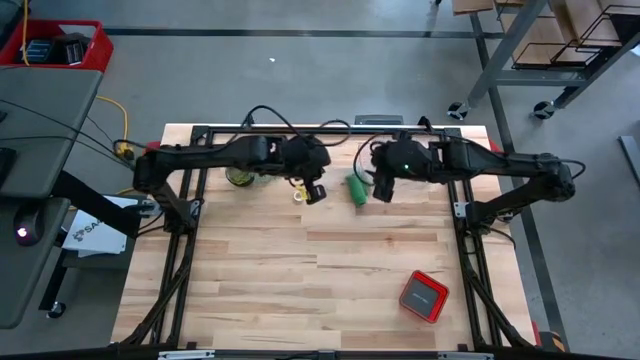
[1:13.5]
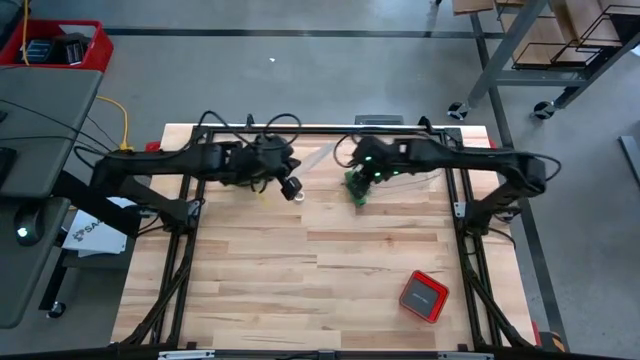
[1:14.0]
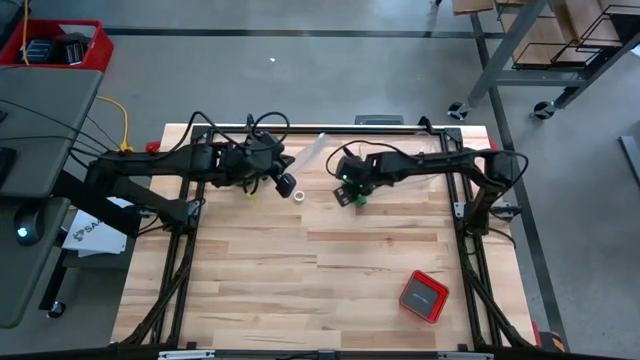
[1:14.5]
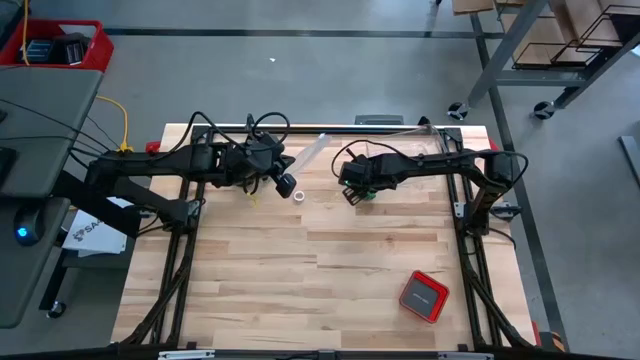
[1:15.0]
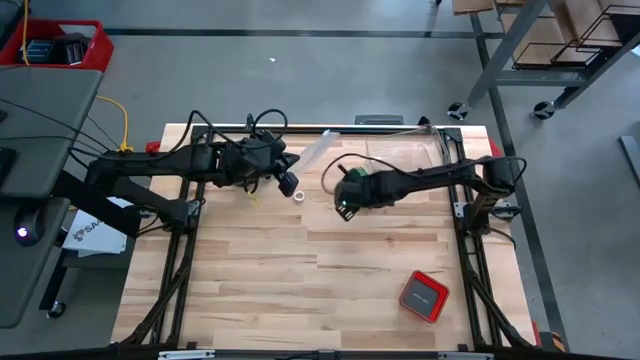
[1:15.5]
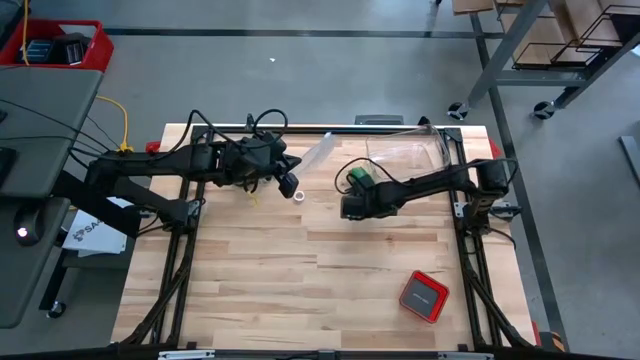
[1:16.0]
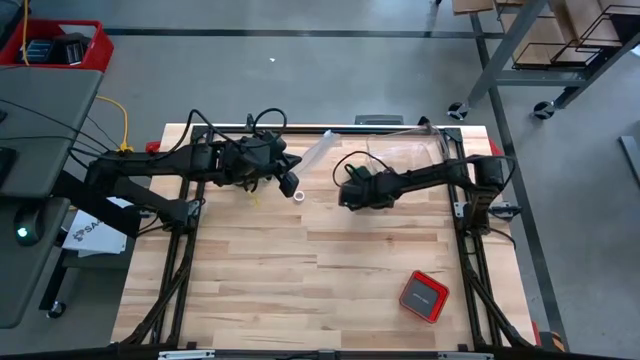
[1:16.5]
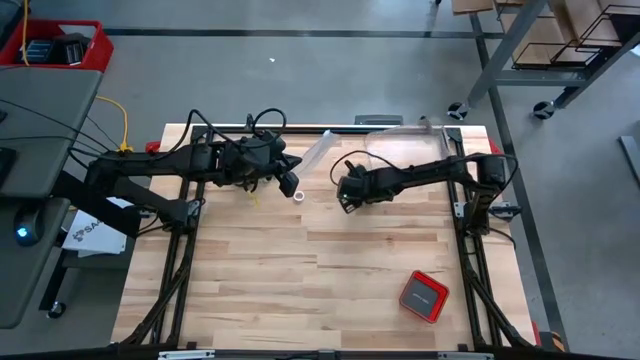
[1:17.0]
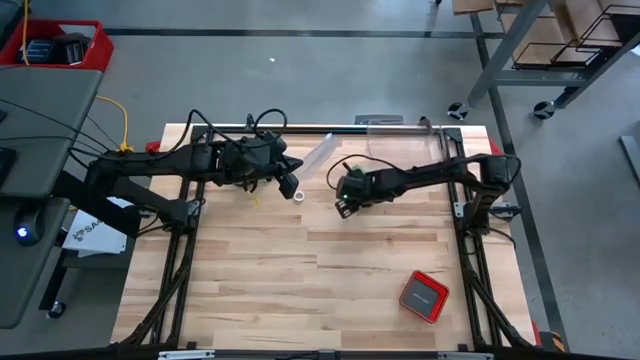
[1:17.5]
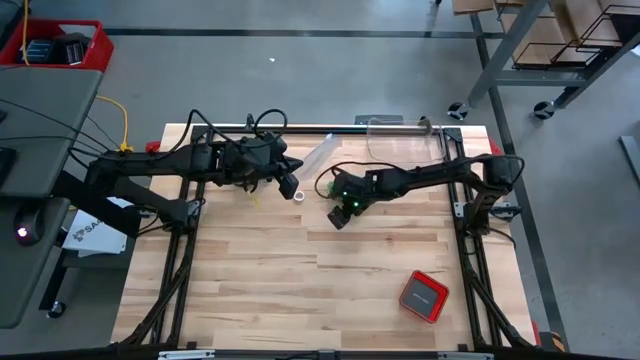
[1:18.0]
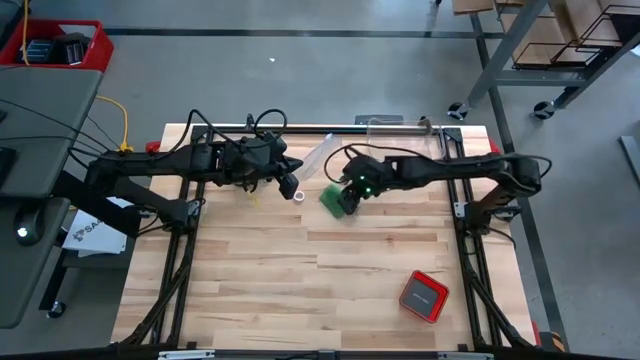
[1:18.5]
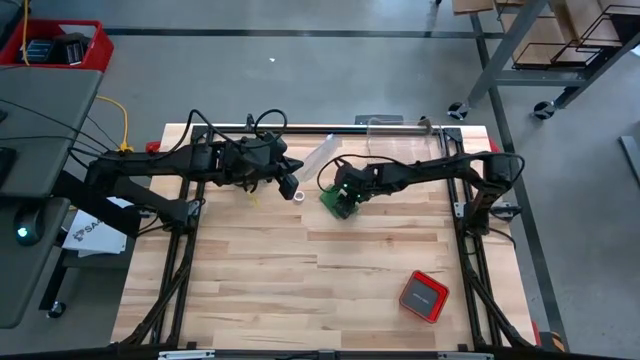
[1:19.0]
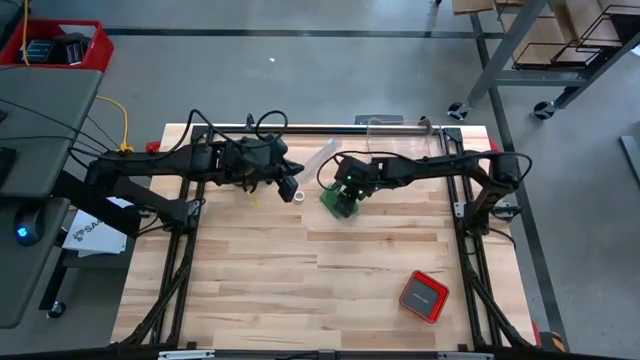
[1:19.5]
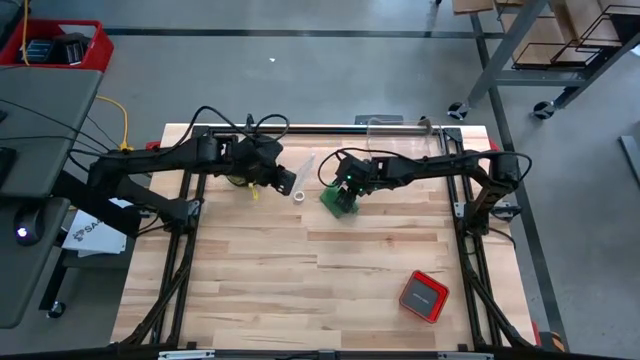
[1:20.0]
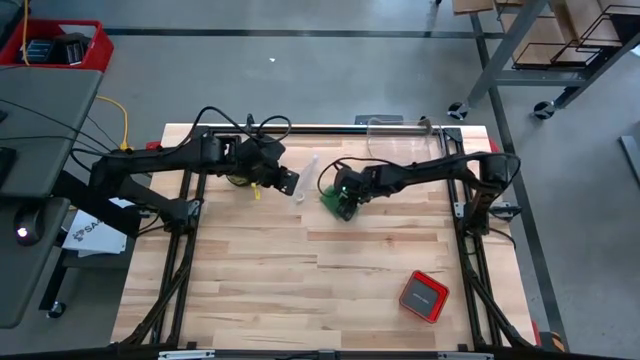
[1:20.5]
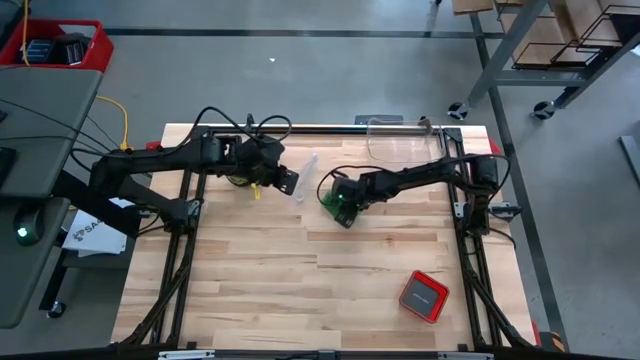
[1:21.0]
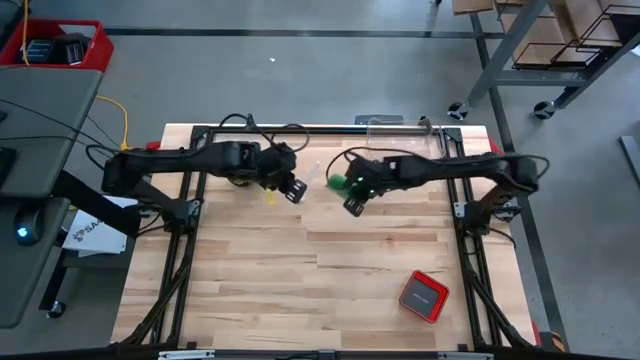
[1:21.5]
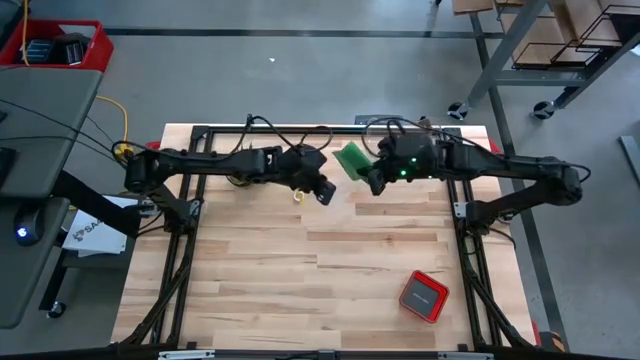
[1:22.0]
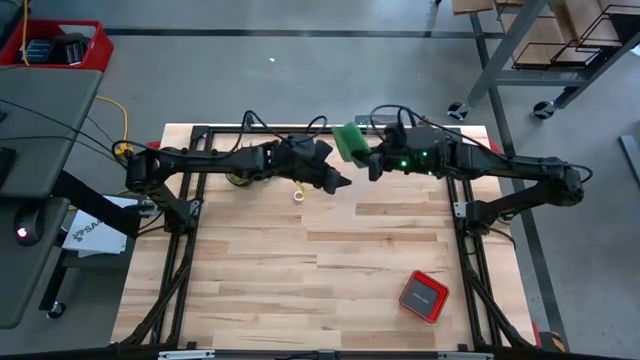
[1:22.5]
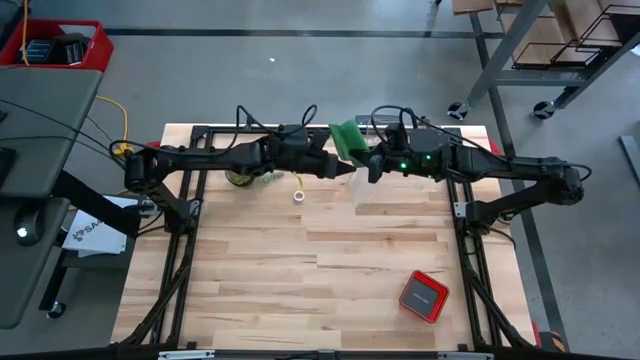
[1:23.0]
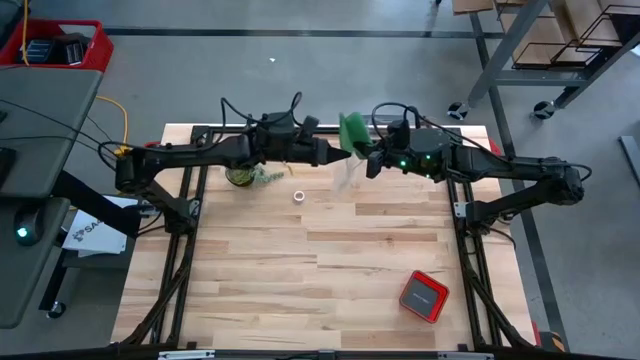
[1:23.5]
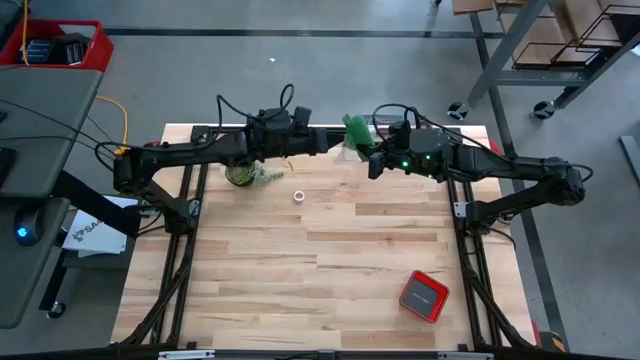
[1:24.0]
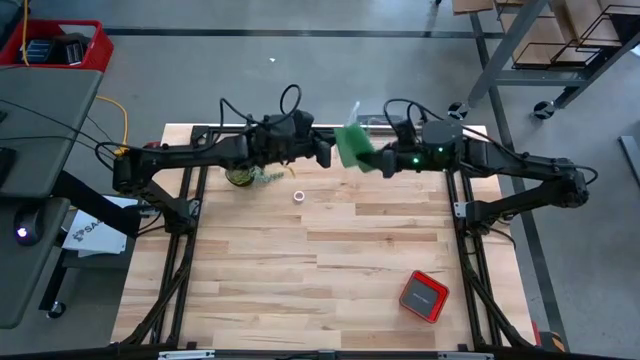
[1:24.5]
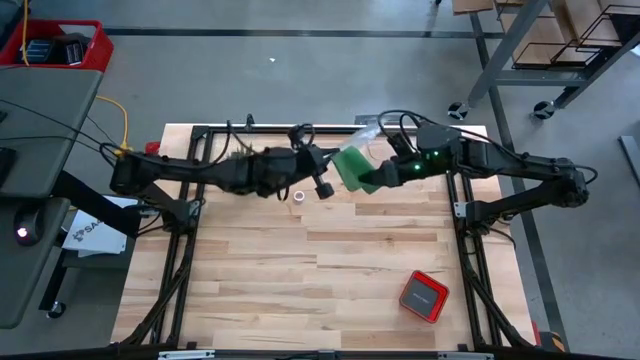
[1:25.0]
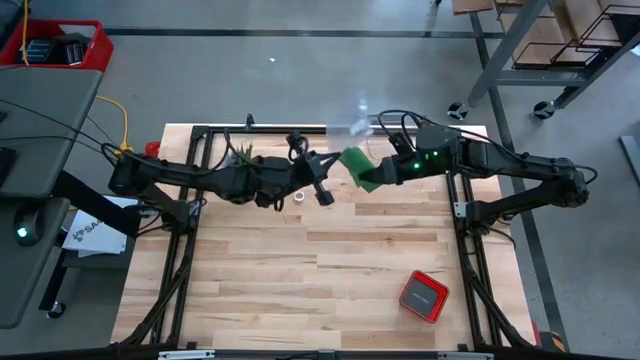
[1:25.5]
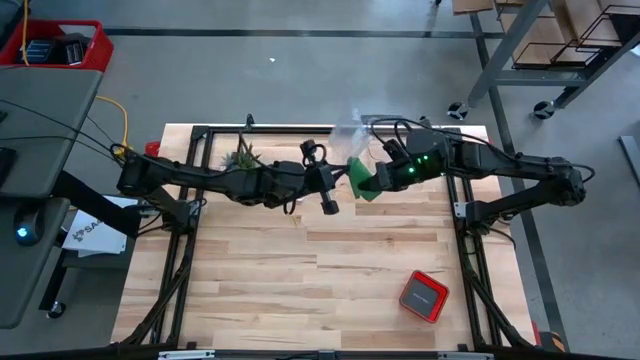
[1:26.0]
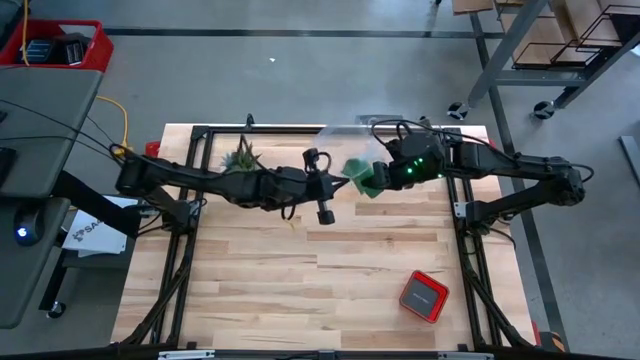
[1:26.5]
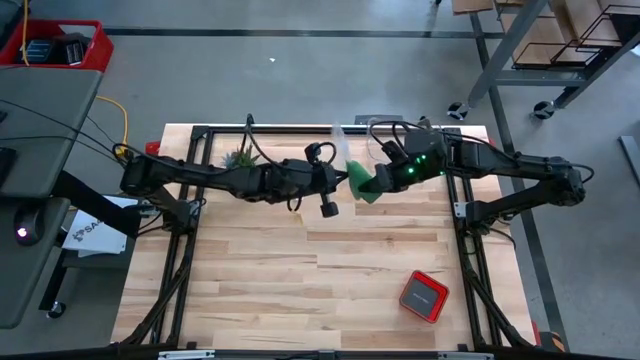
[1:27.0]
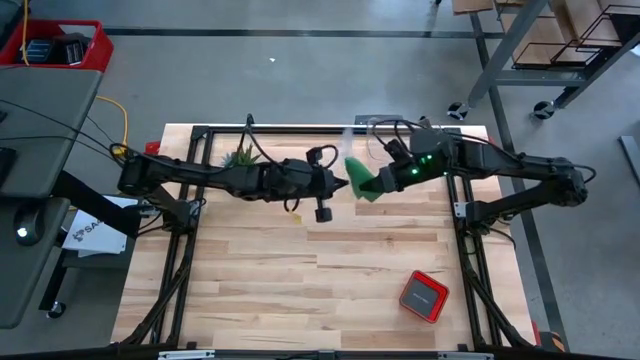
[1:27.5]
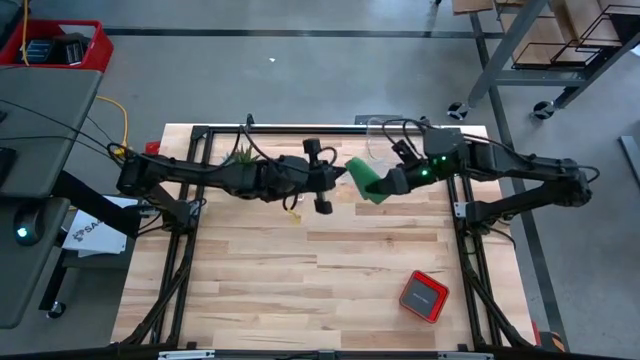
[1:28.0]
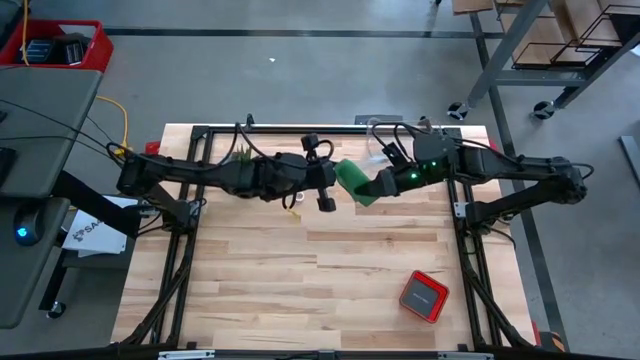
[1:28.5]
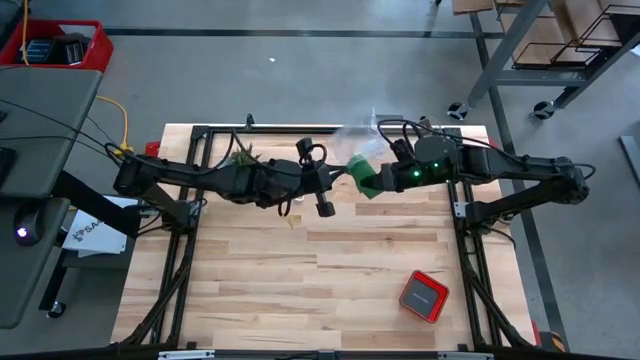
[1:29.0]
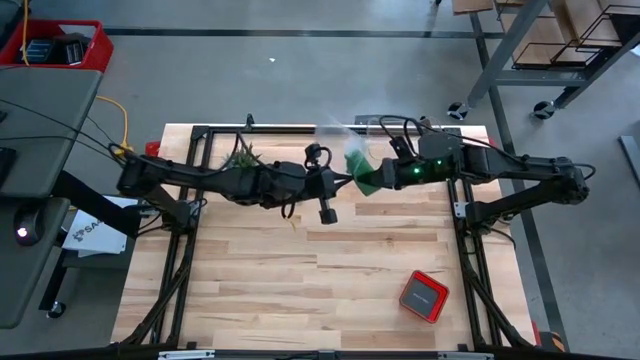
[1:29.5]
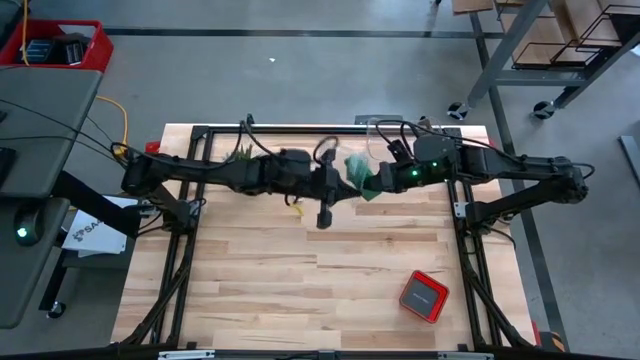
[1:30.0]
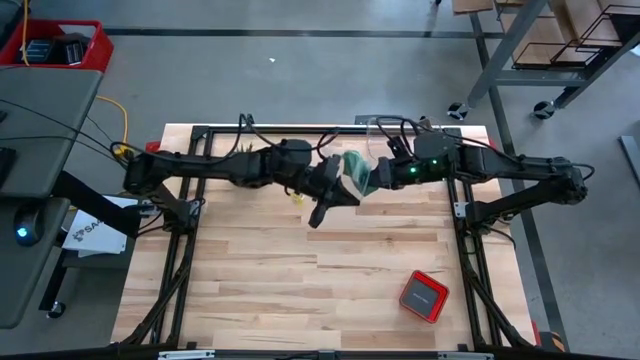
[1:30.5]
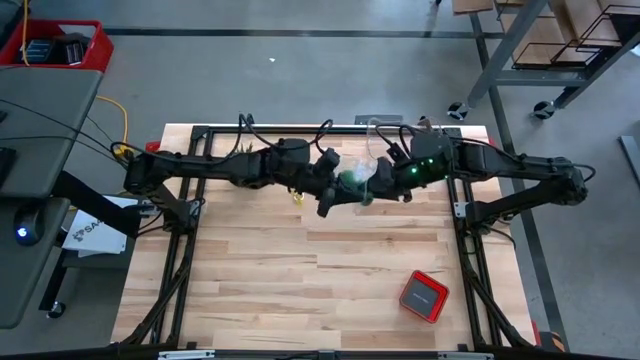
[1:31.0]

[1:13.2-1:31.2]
Task: Roll bandage
Put the green bandage into the transparent zip bag

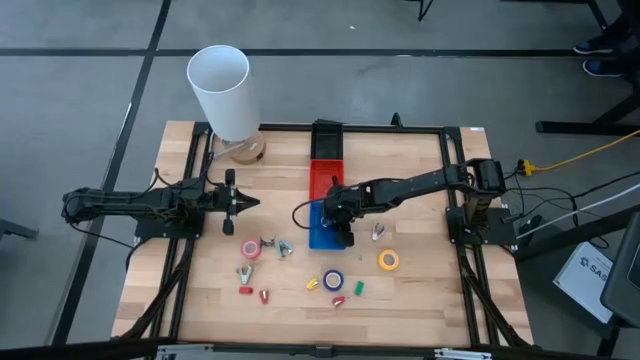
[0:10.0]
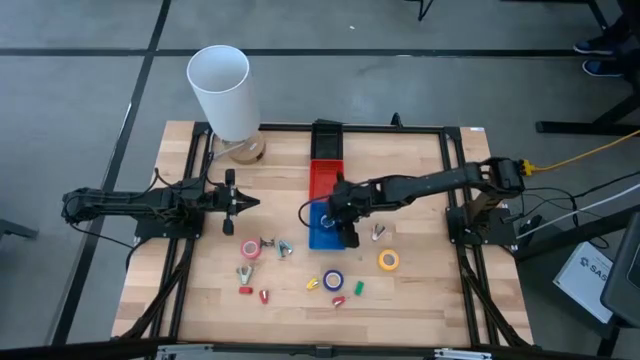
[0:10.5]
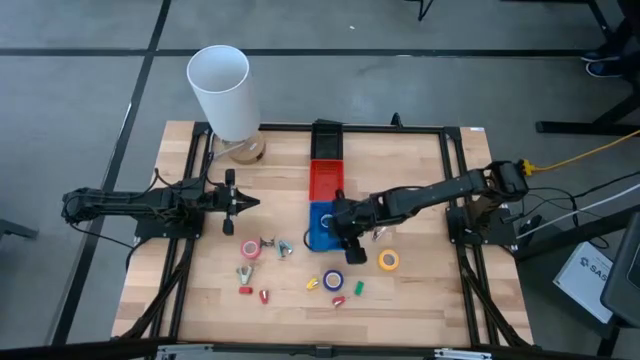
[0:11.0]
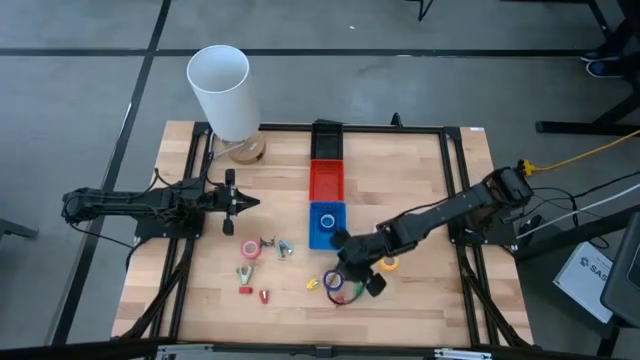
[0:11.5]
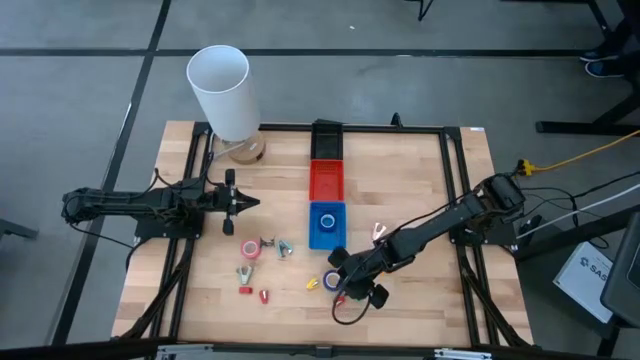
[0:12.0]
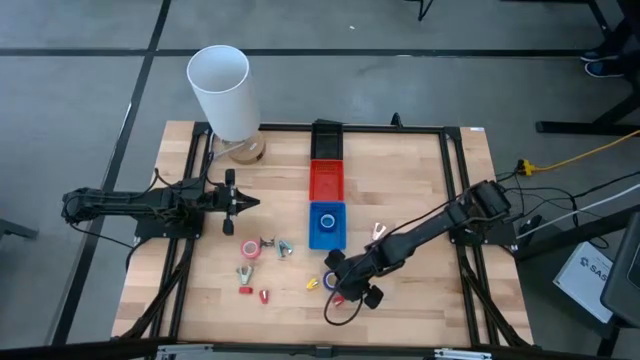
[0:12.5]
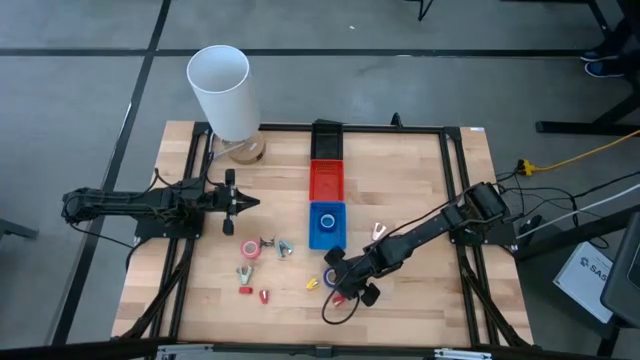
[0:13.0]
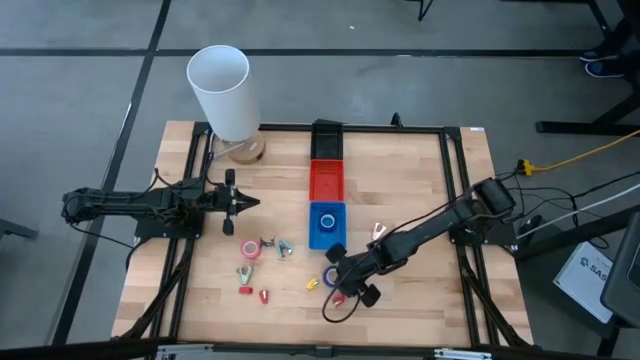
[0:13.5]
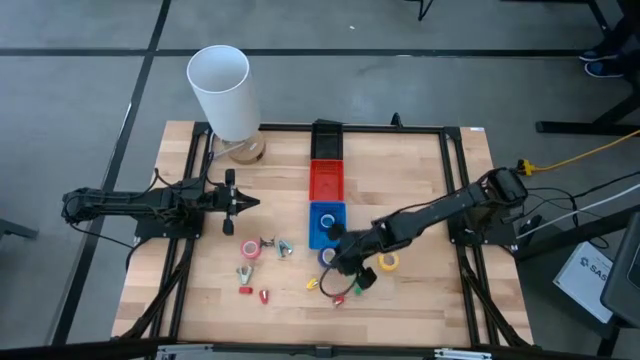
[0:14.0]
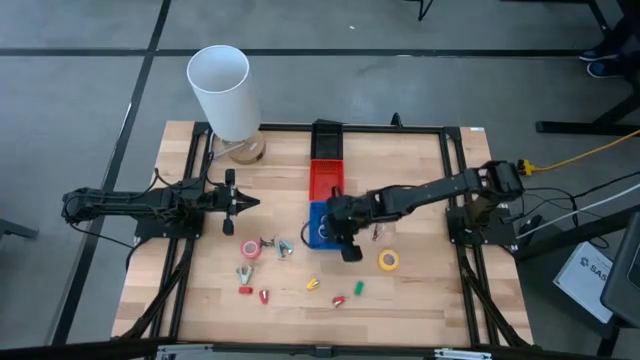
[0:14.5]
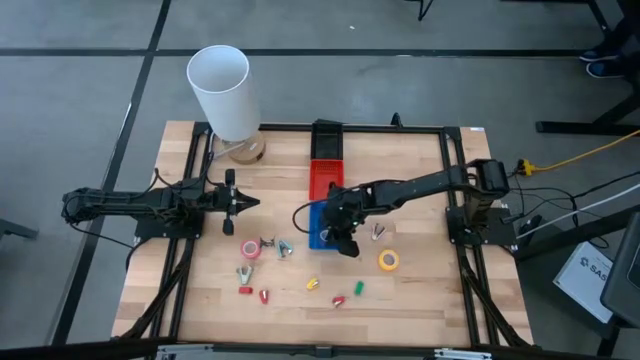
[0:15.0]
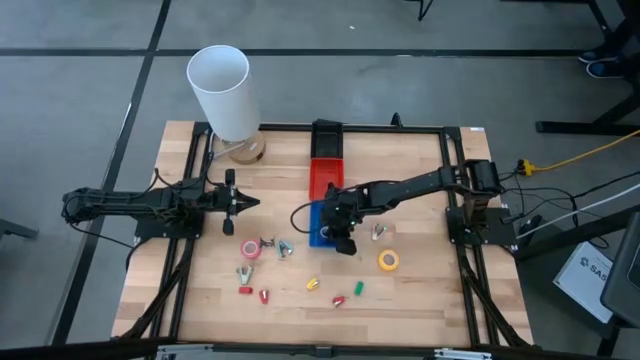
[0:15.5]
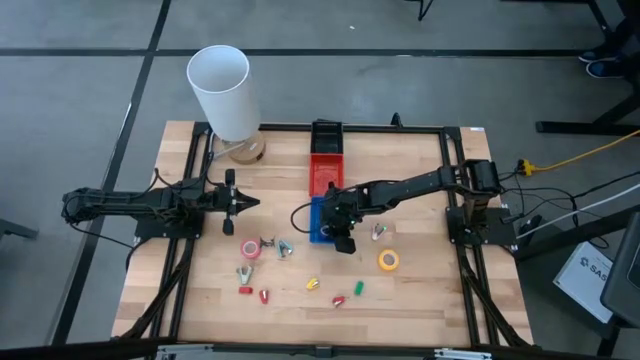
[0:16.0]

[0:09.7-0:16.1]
Task: Pick and place Stapler, Stapler remover, tape
Put the blue tape into the blue bin
